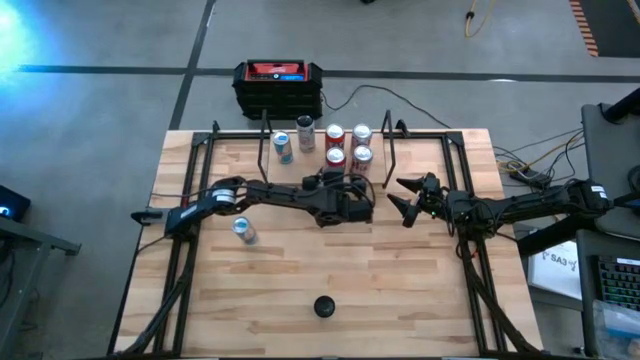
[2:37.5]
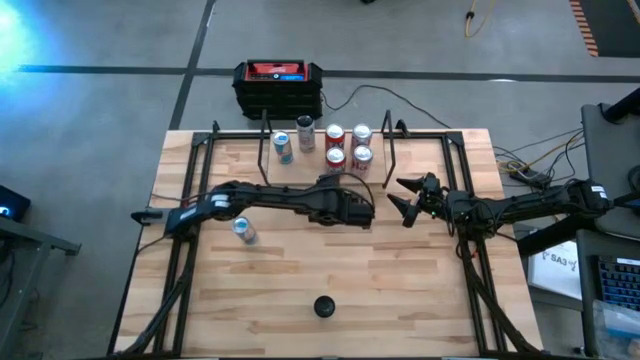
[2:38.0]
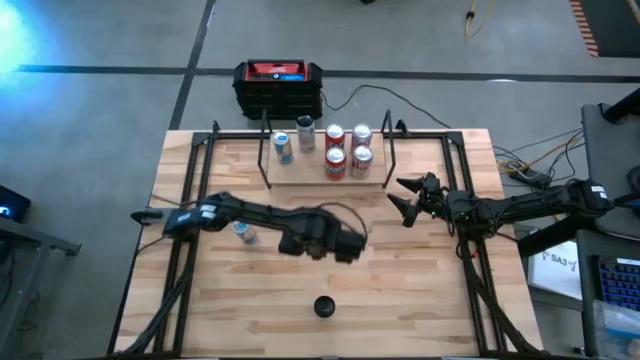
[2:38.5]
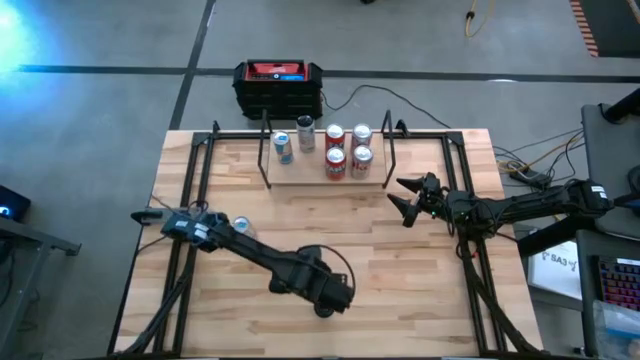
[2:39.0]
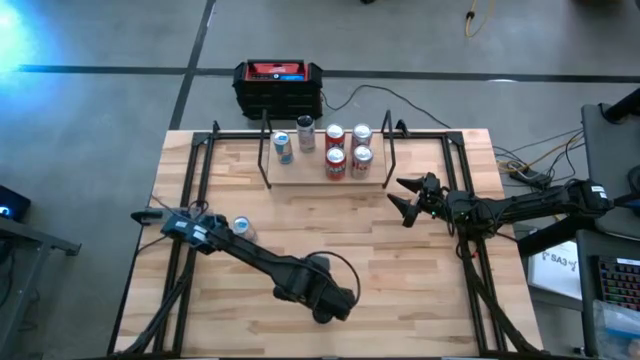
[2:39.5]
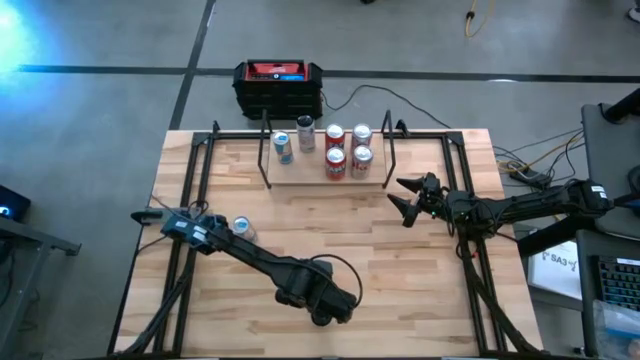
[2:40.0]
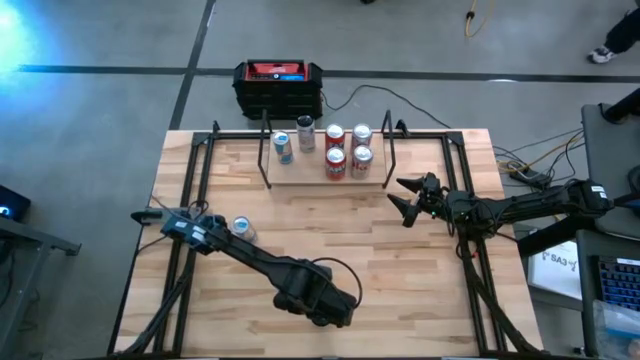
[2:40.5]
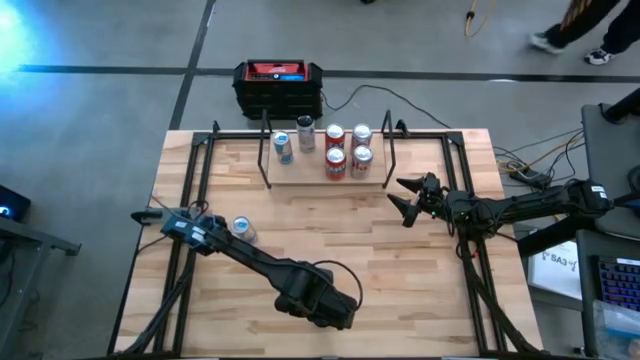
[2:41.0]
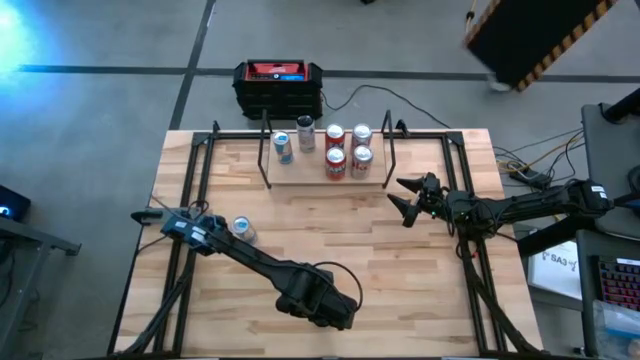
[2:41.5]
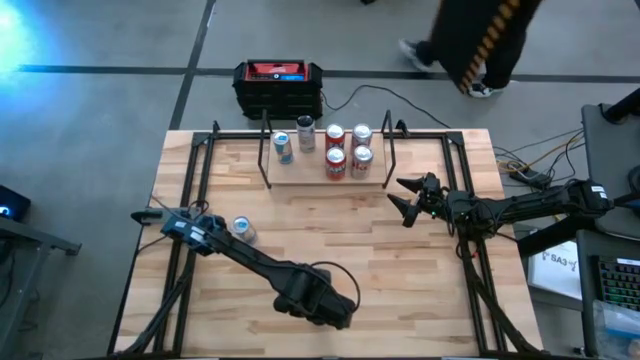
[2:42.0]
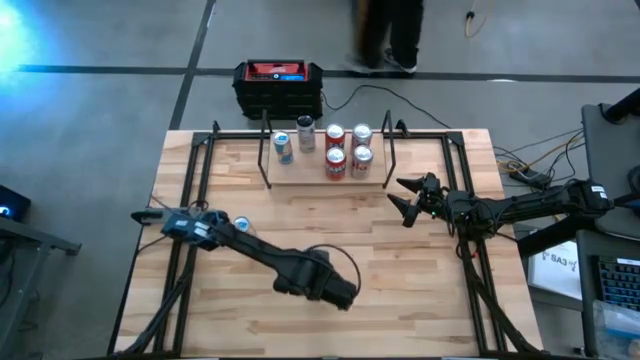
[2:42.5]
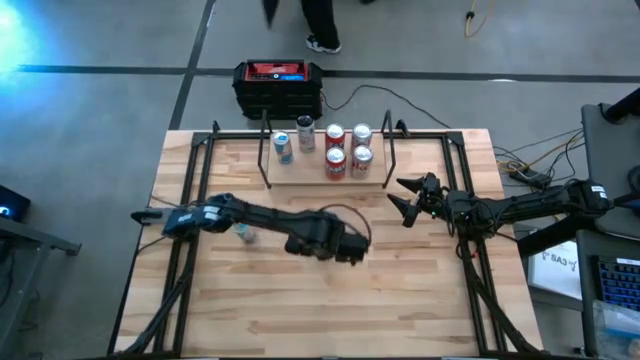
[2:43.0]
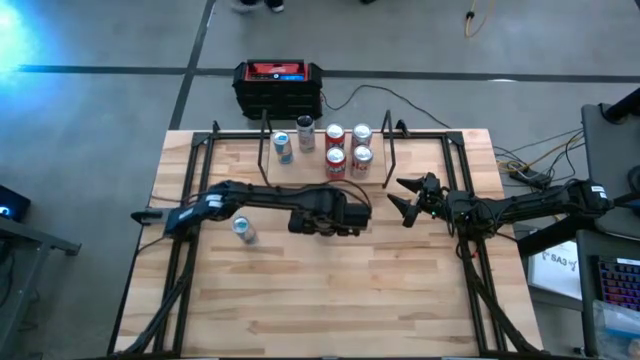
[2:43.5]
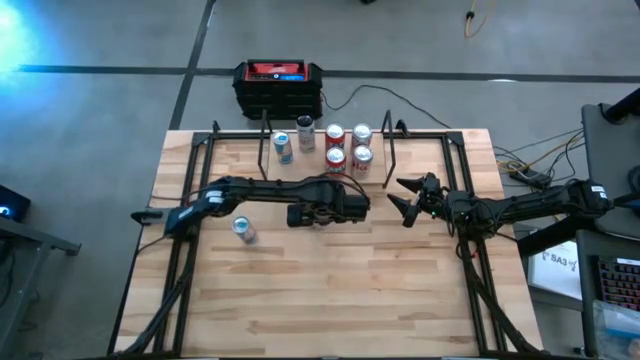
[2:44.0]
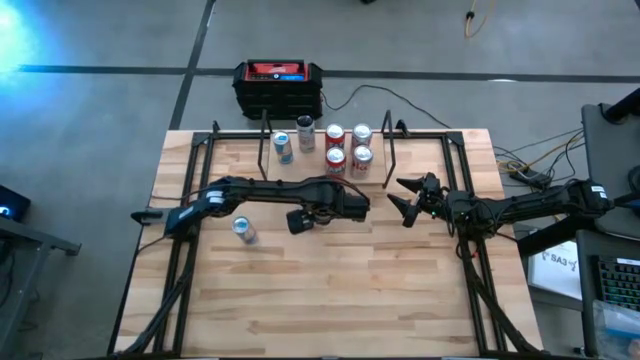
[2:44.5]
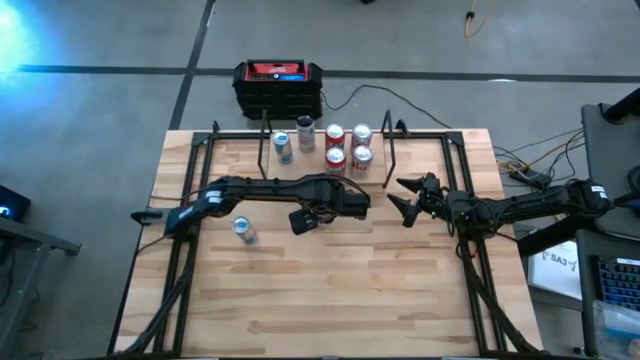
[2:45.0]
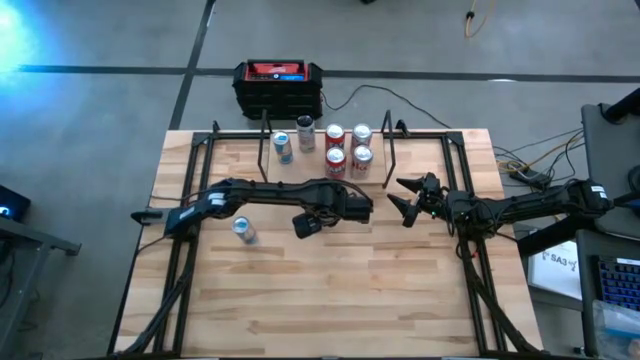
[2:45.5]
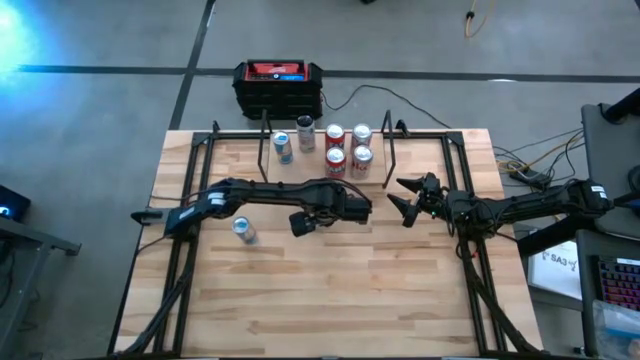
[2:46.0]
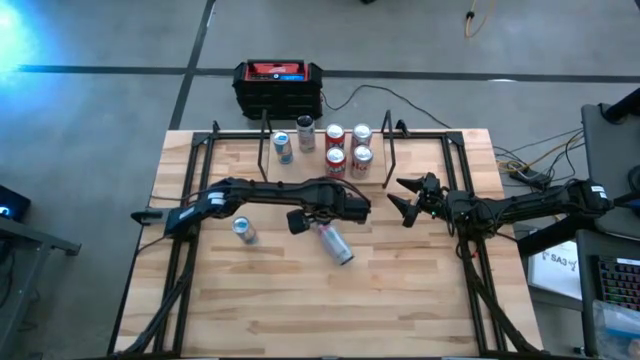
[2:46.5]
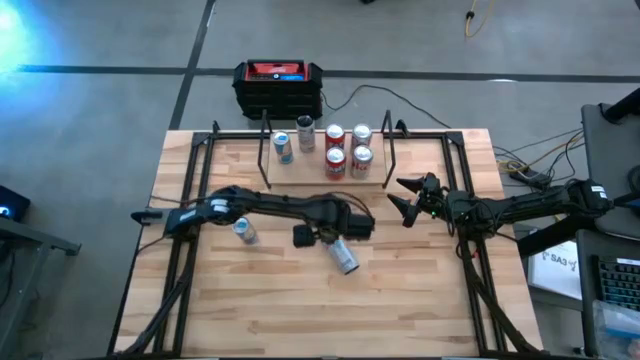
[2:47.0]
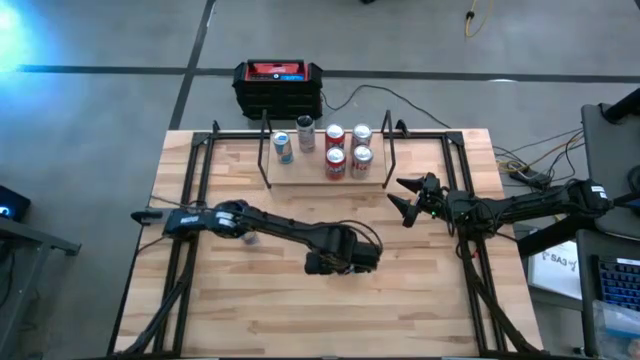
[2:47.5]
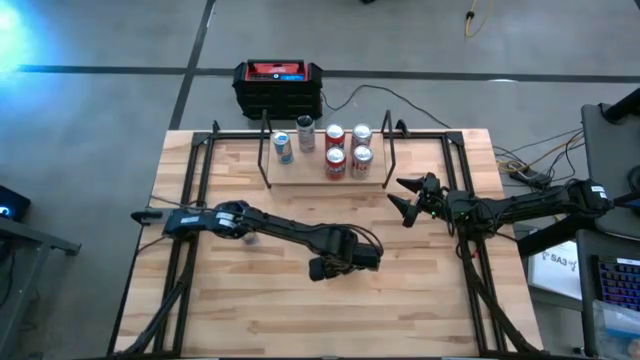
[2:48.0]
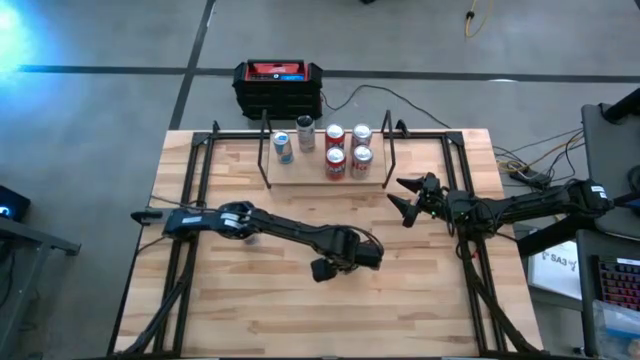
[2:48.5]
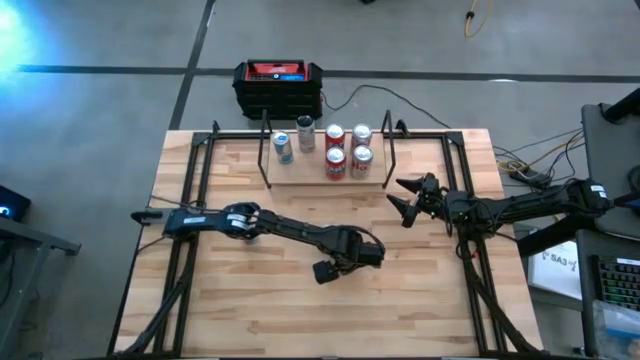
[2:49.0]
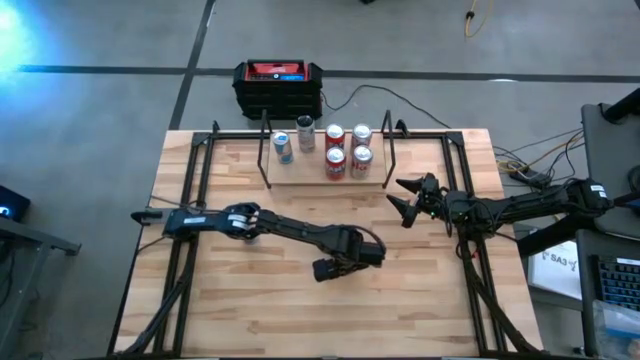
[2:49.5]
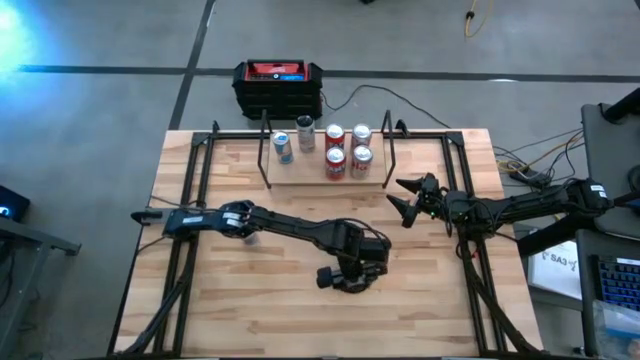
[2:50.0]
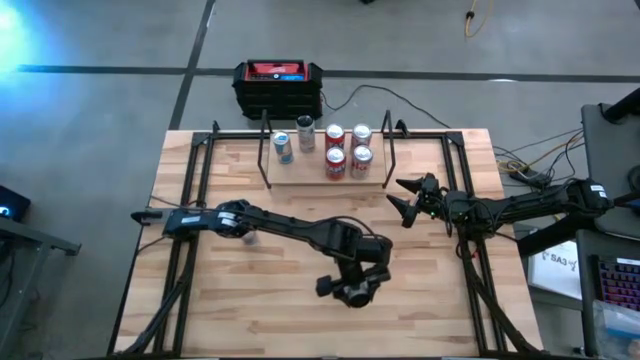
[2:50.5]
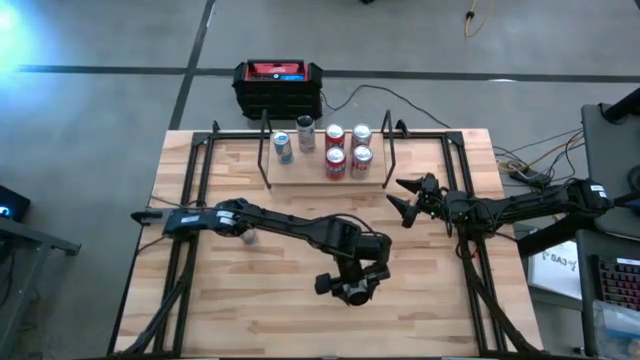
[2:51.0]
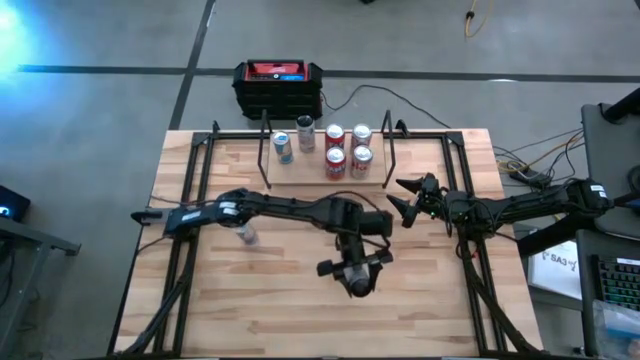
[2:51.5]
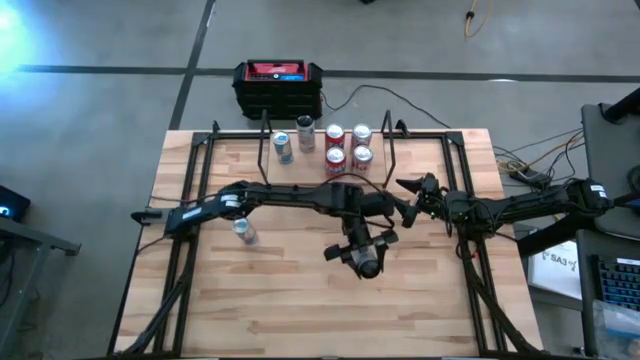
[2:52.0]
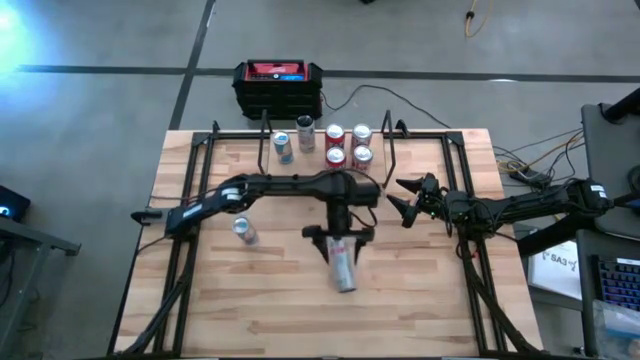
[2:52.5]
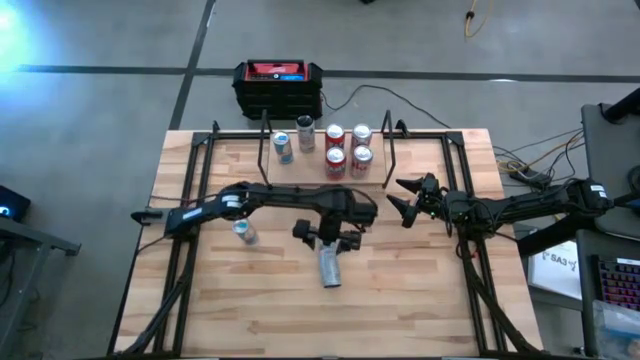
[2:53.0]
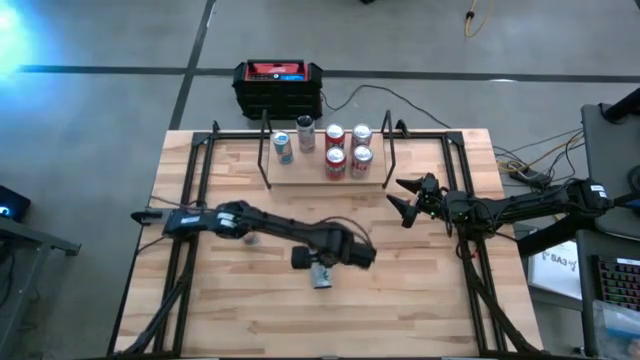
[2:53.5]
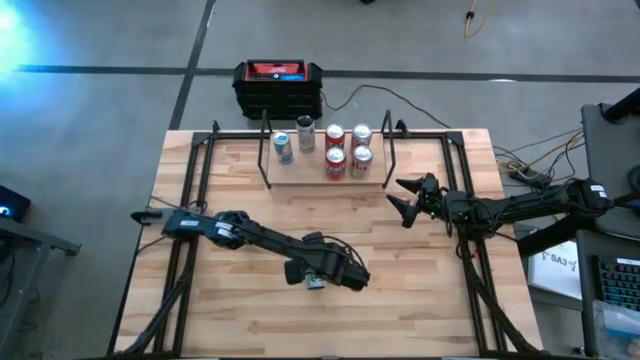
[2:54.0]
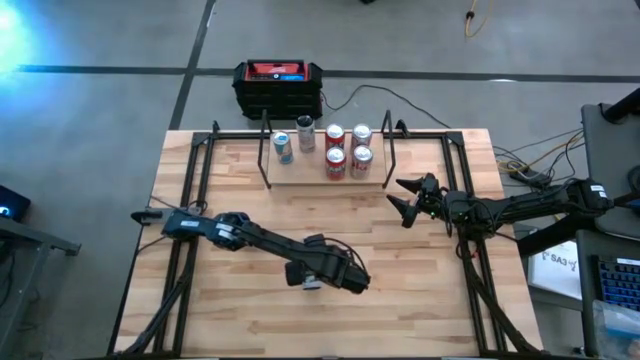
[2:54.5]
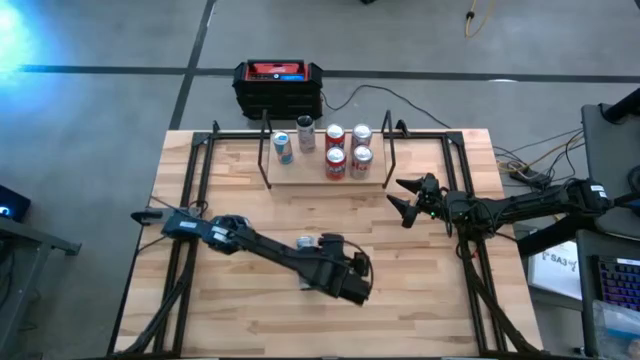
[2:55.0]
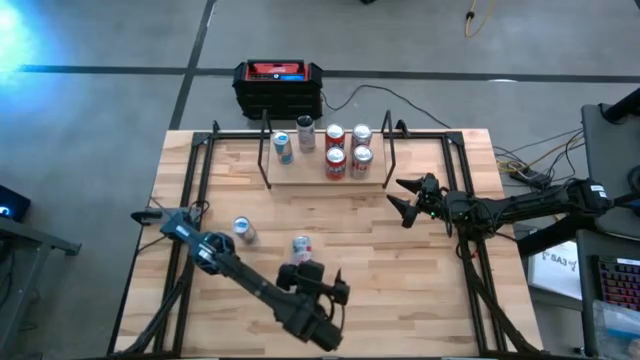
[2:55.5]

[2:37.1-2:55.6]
Task: Place canned beverage on shelf
Put the white and pink soda can on the shelf aligned with the other white and pink soda can

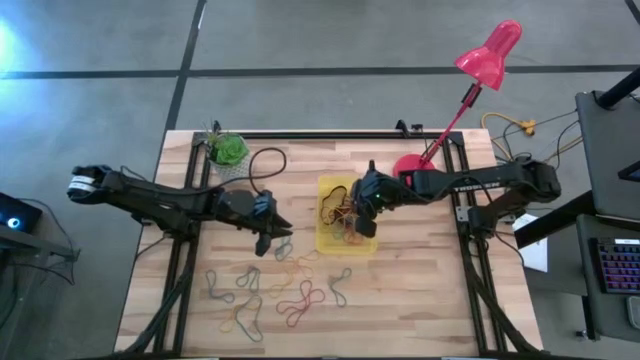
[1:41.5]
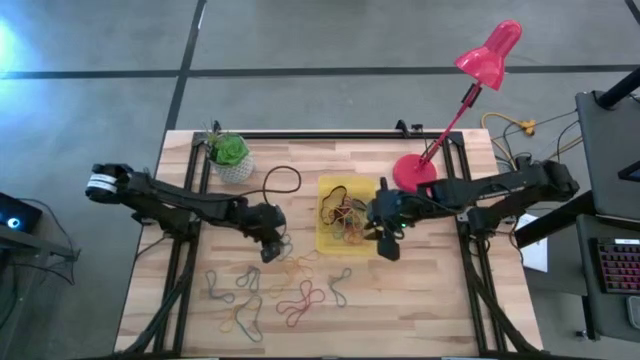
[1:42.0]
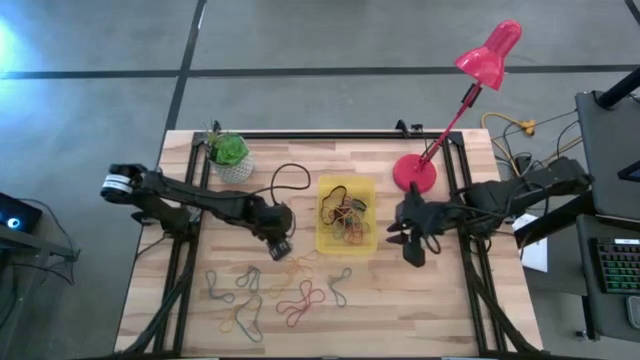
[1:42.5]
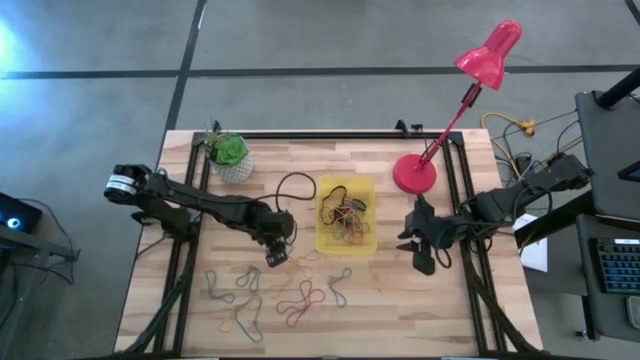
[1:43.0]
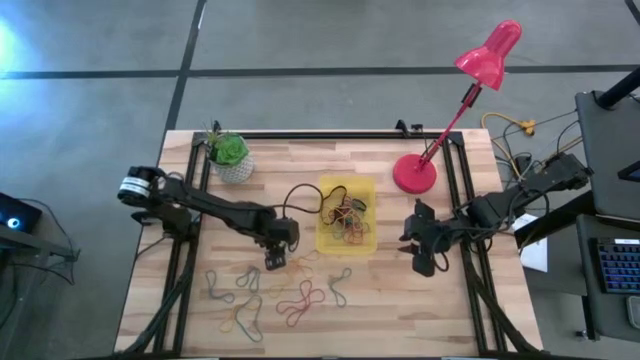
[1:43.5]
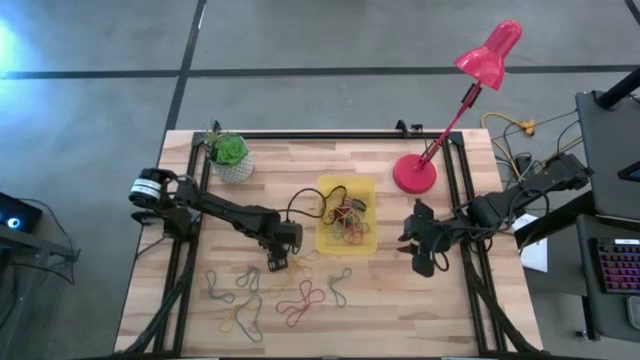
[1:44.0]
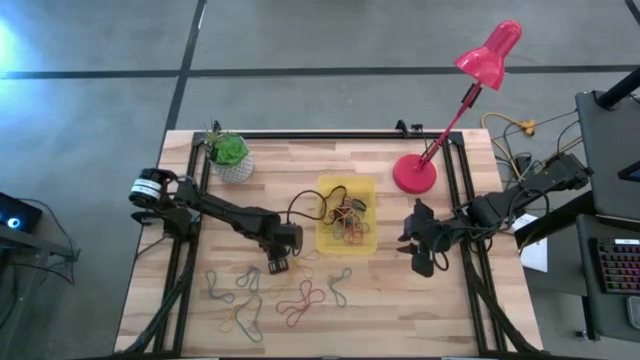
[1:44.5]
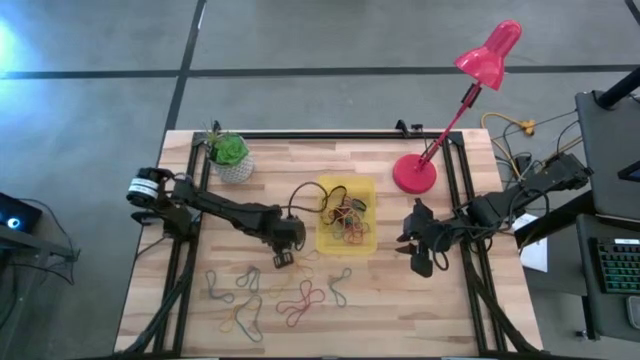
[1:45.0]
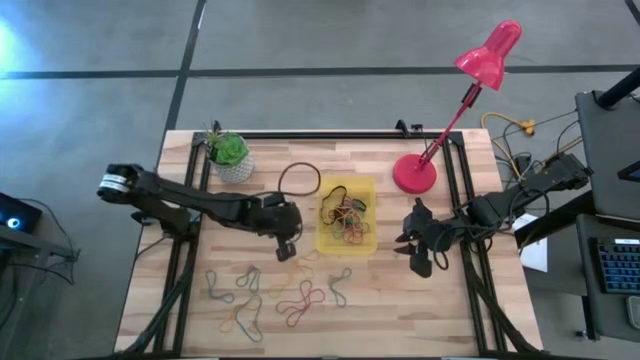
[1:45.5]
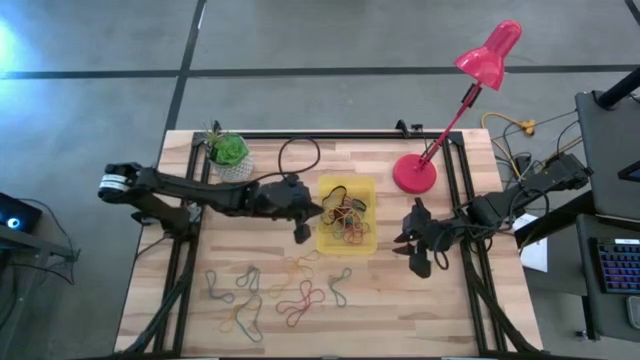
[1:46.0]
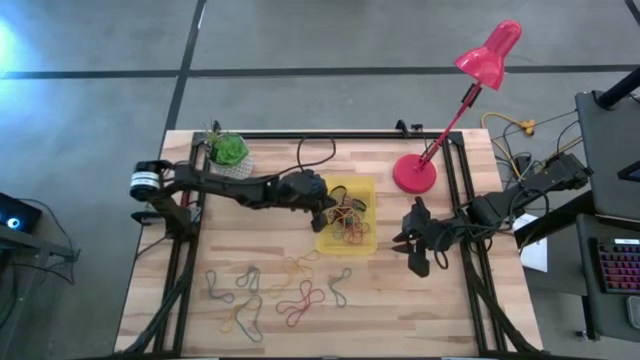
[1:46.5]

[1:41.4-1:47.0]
Task: Pick and place rubber bands into bin
Put the blue rubber band into the bin
